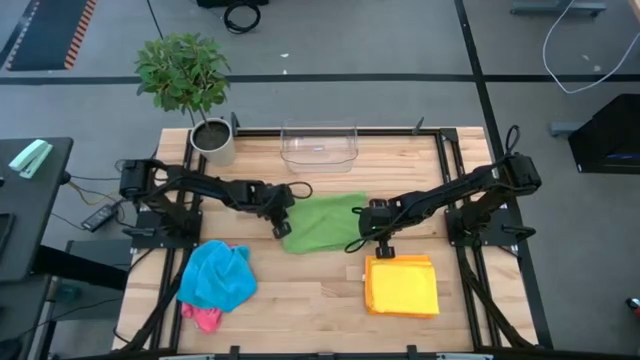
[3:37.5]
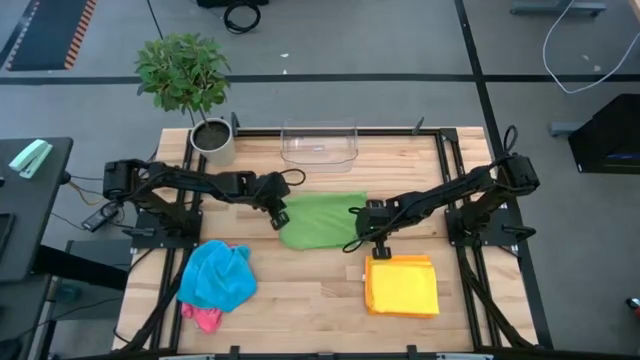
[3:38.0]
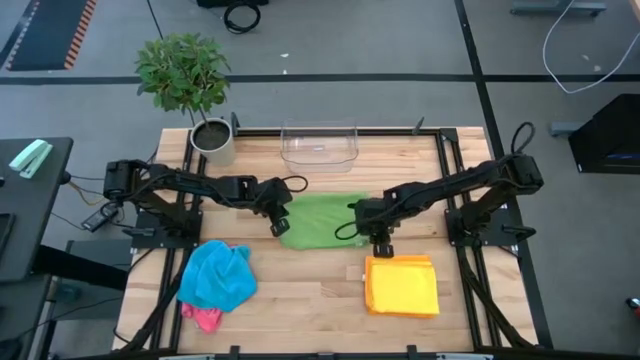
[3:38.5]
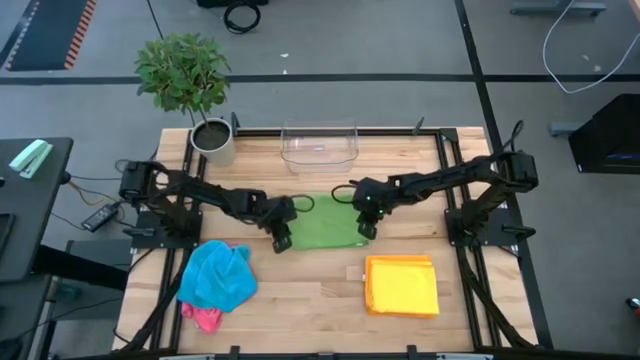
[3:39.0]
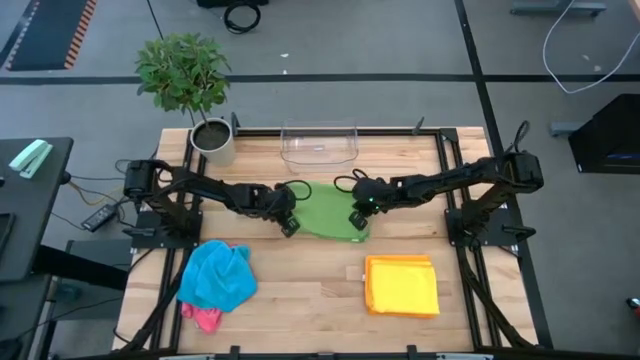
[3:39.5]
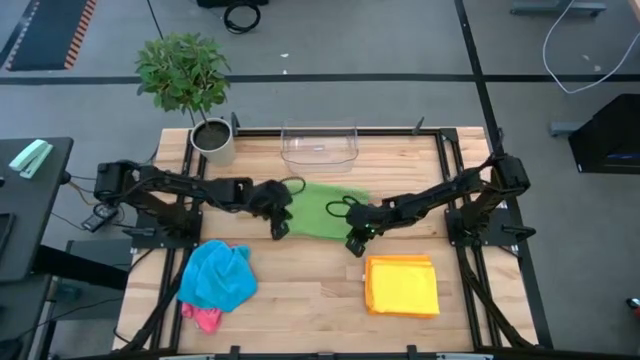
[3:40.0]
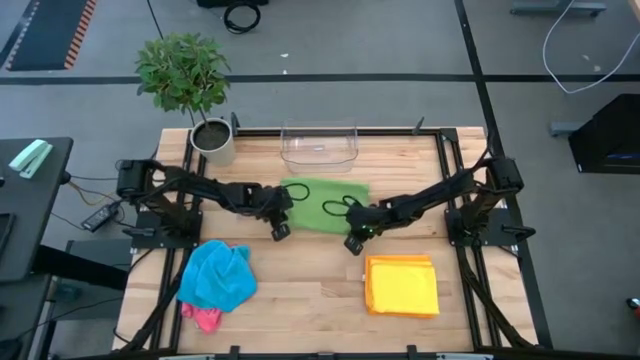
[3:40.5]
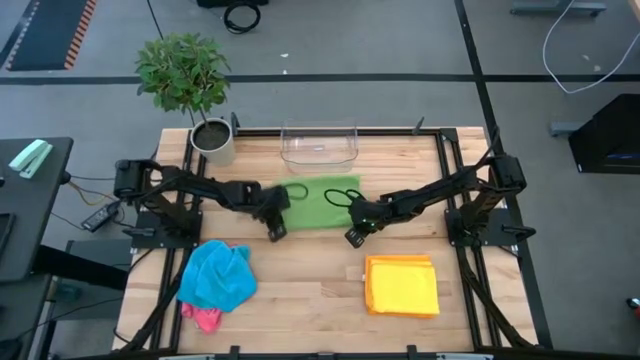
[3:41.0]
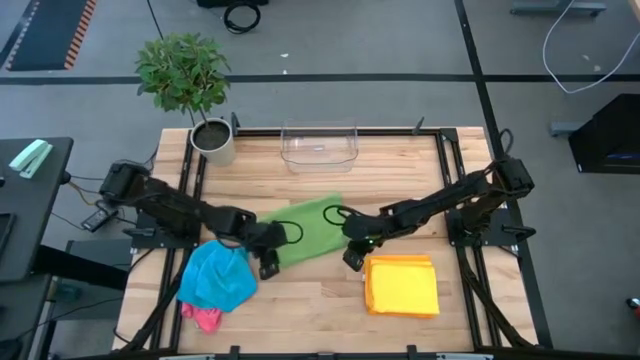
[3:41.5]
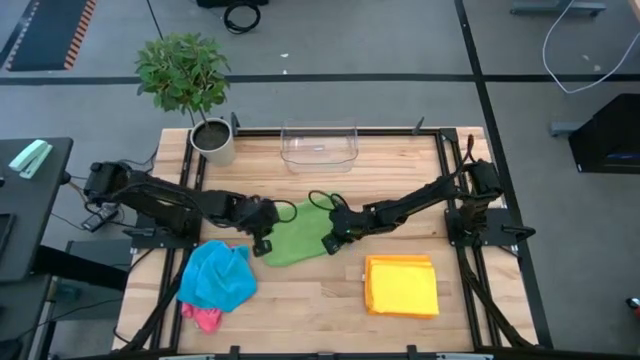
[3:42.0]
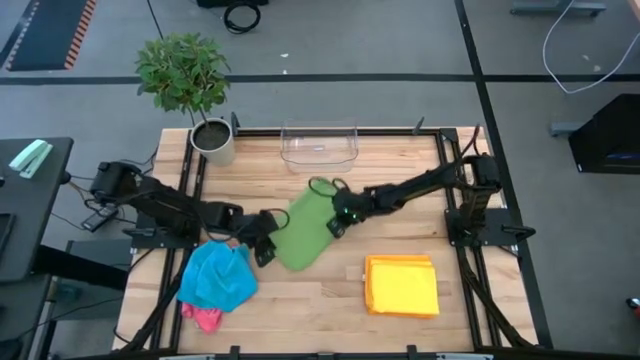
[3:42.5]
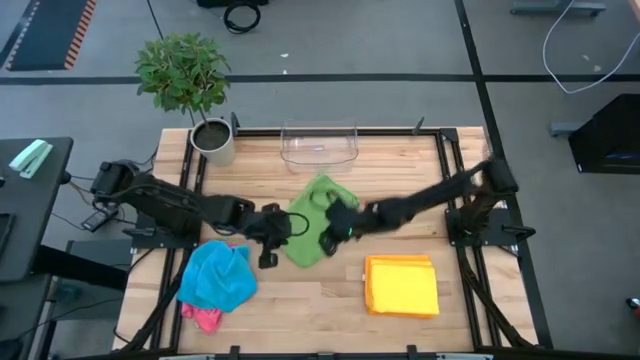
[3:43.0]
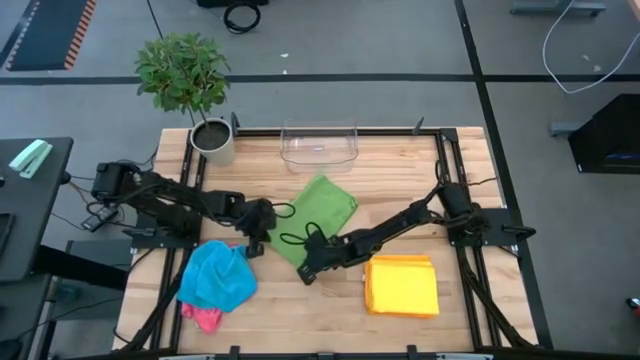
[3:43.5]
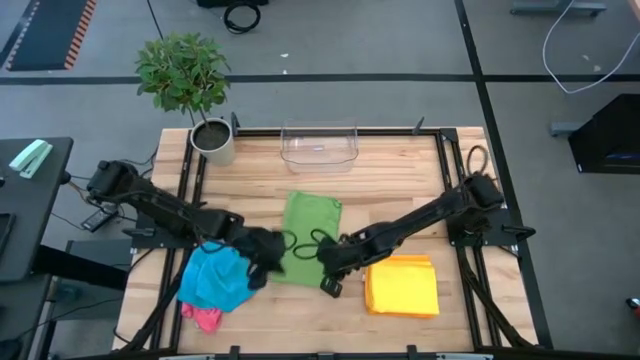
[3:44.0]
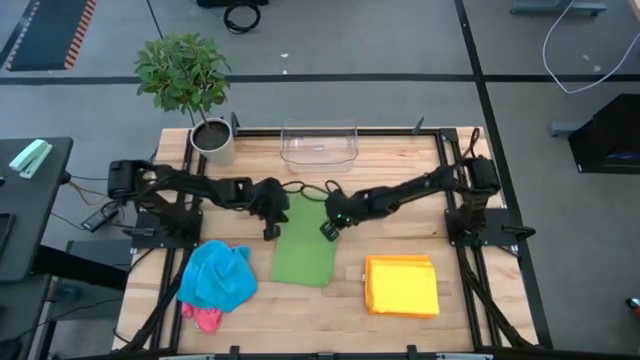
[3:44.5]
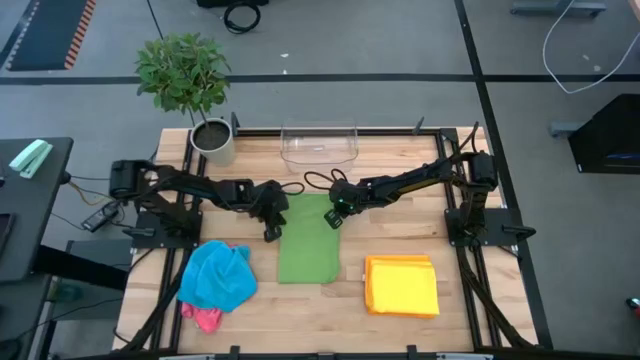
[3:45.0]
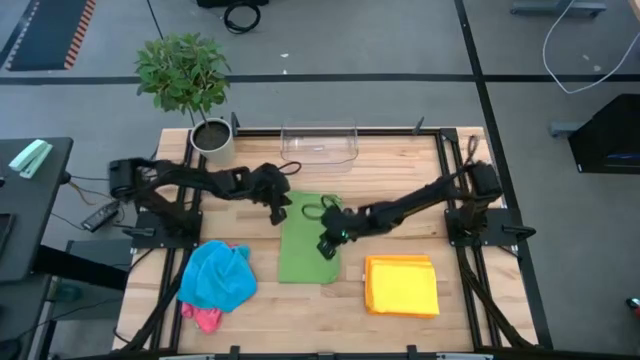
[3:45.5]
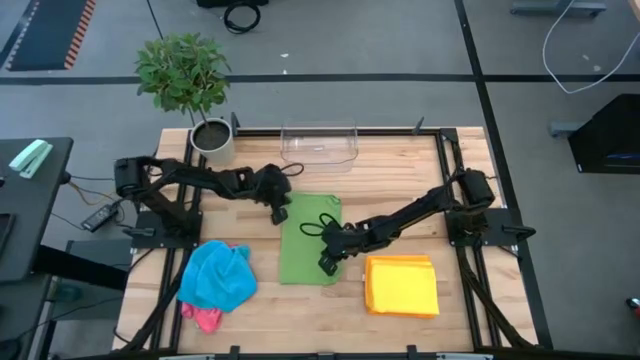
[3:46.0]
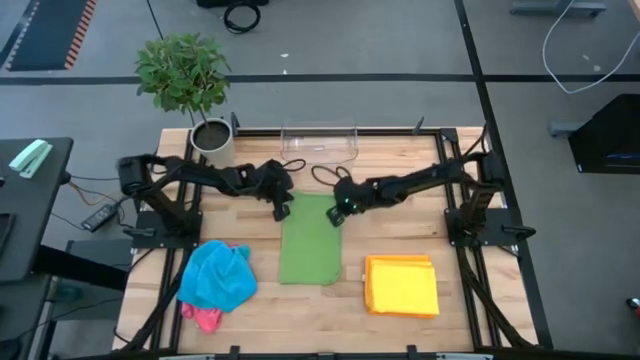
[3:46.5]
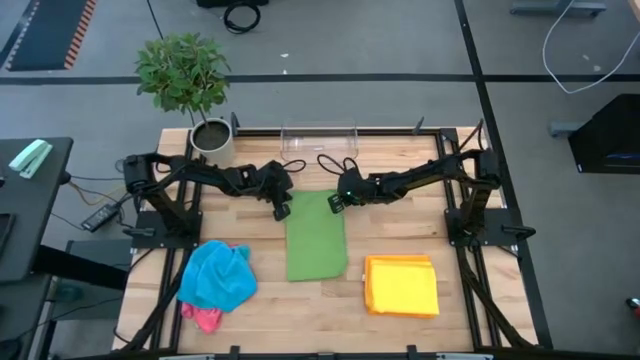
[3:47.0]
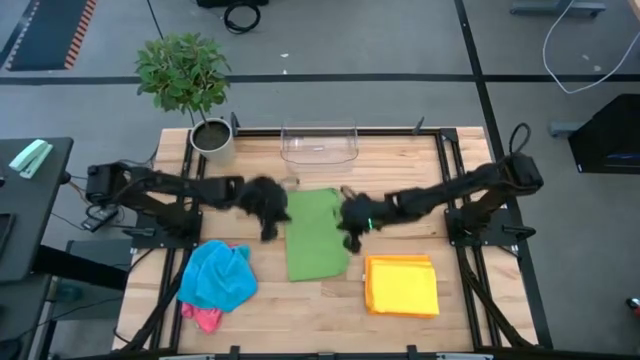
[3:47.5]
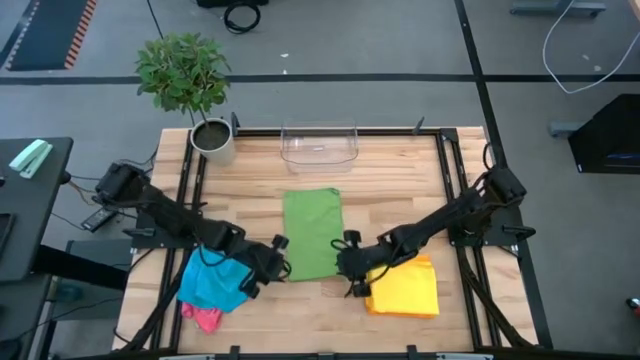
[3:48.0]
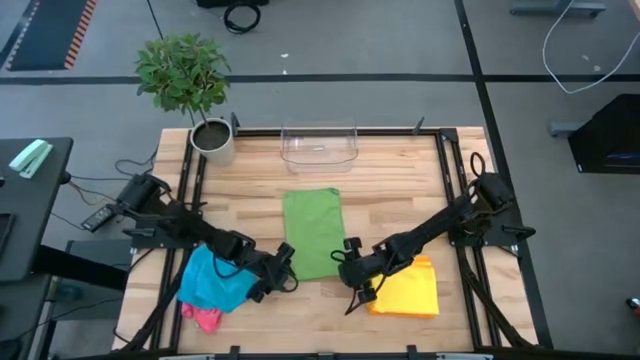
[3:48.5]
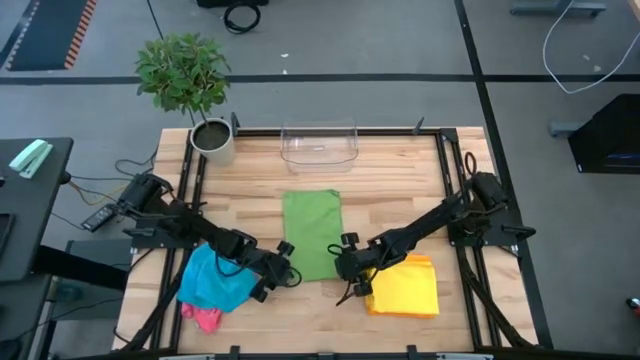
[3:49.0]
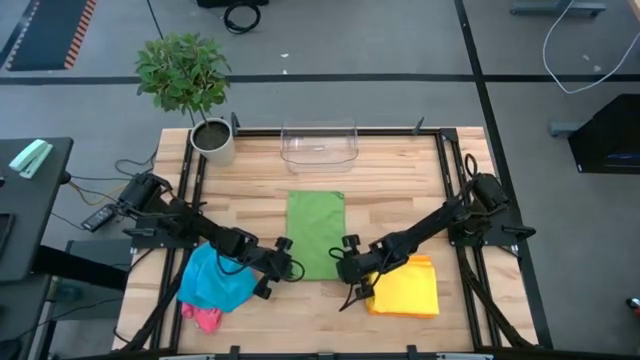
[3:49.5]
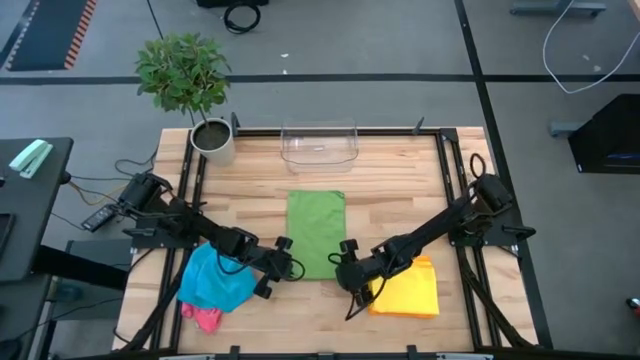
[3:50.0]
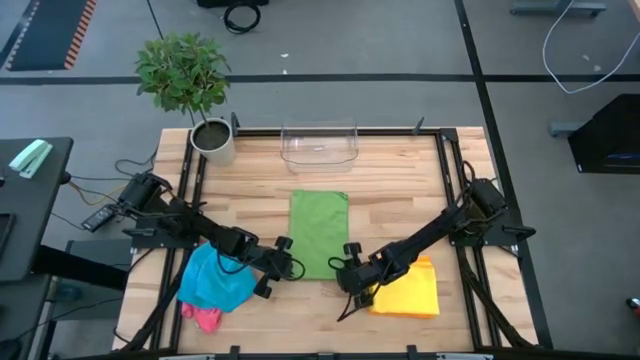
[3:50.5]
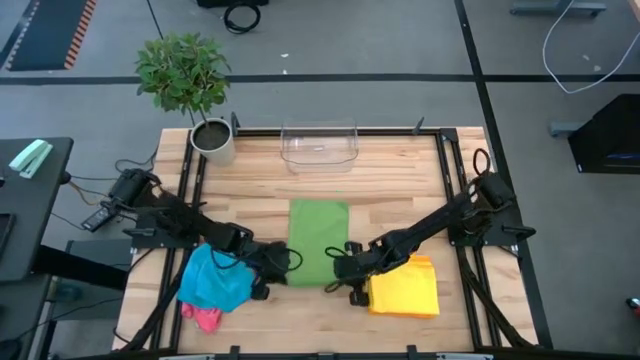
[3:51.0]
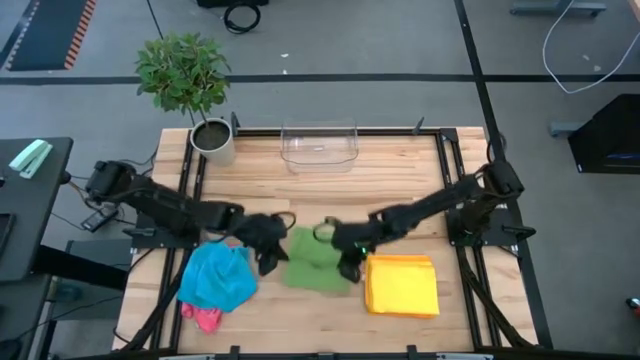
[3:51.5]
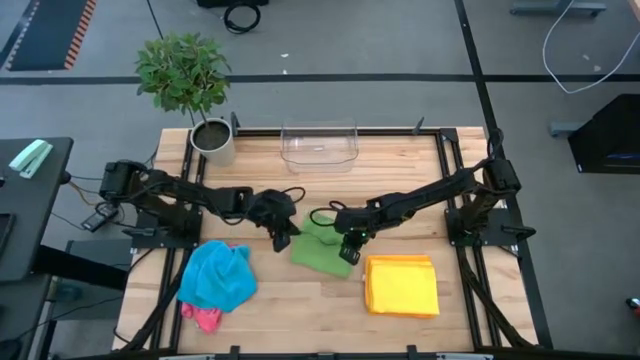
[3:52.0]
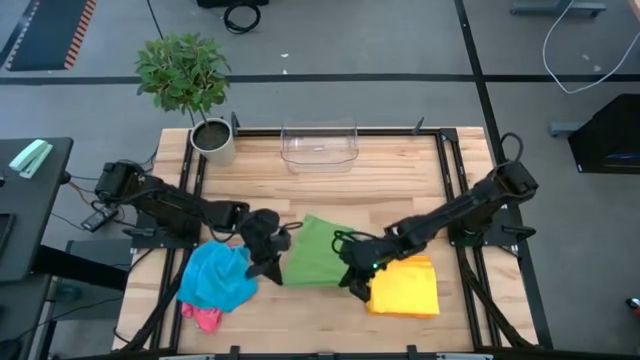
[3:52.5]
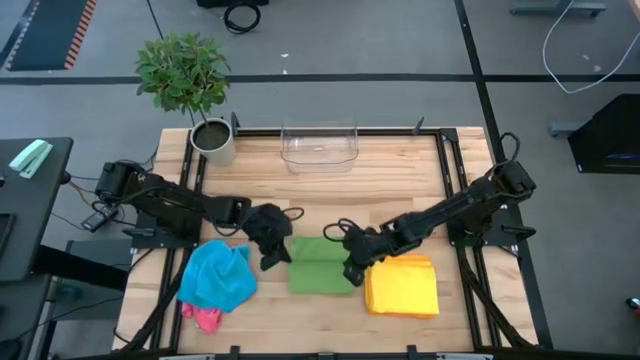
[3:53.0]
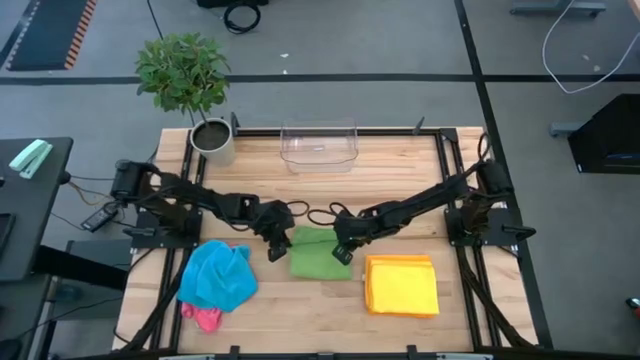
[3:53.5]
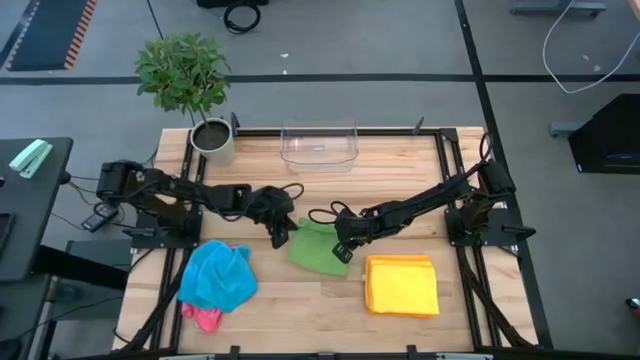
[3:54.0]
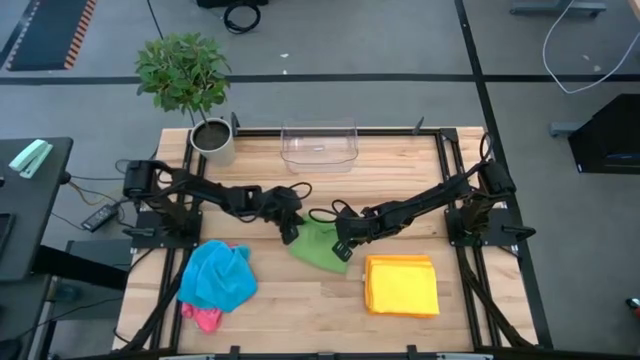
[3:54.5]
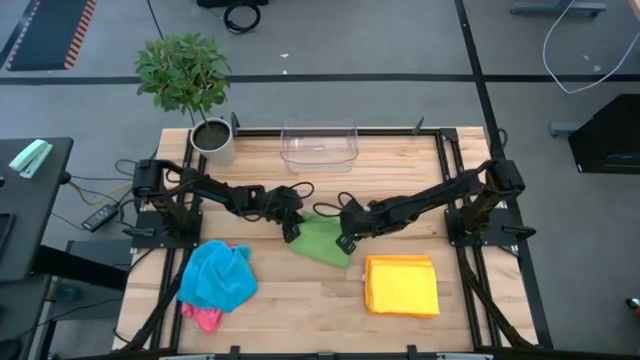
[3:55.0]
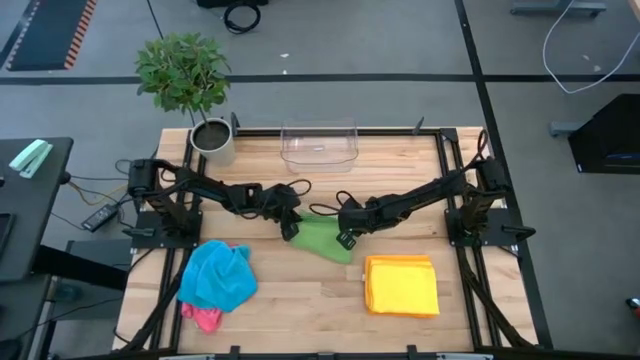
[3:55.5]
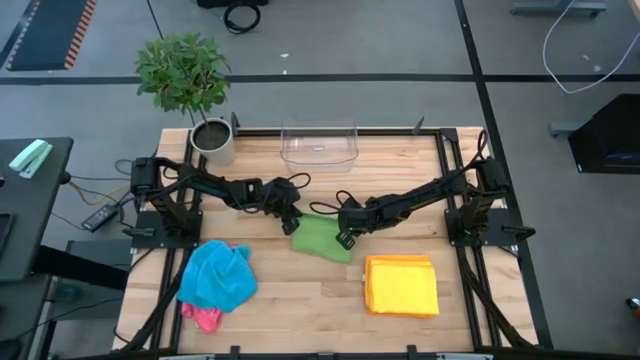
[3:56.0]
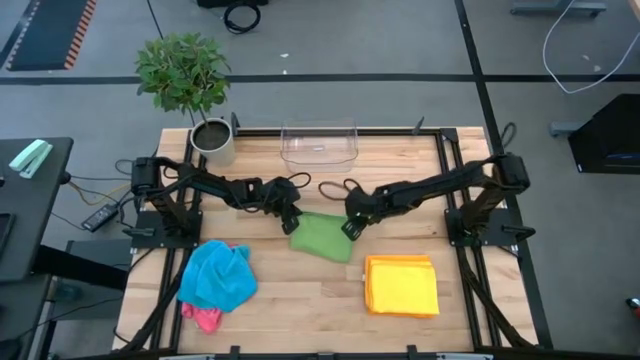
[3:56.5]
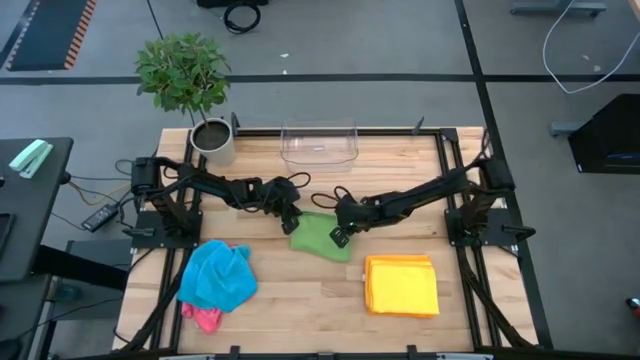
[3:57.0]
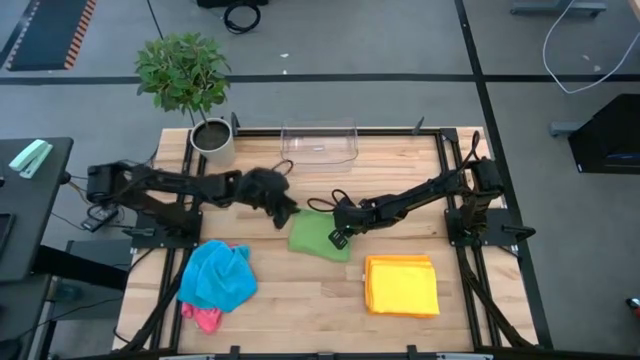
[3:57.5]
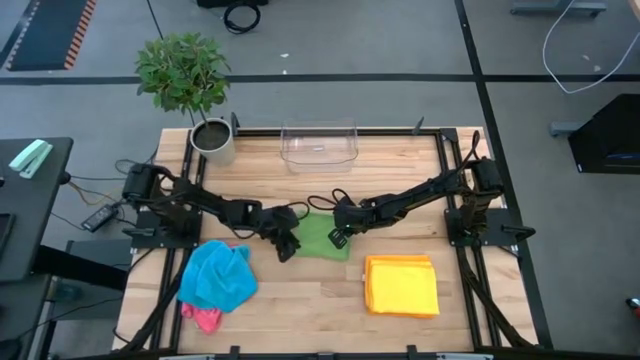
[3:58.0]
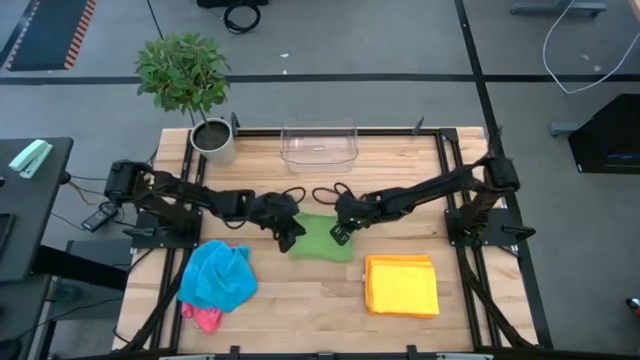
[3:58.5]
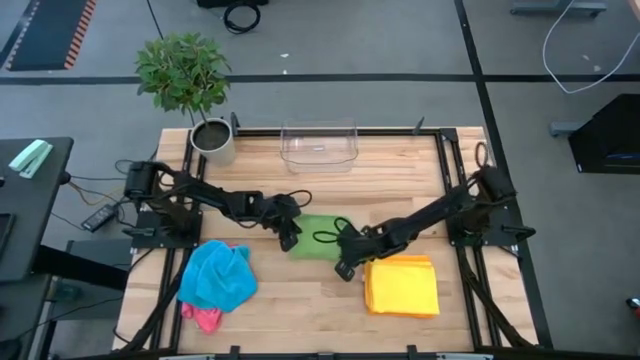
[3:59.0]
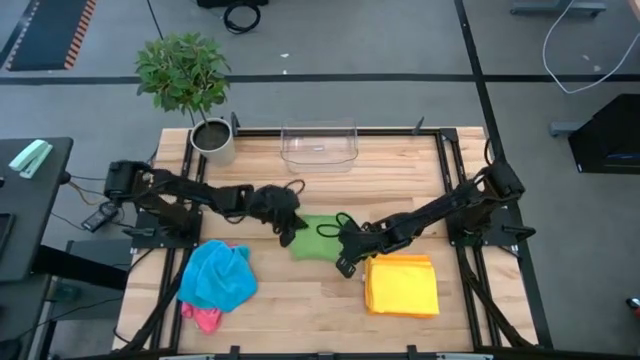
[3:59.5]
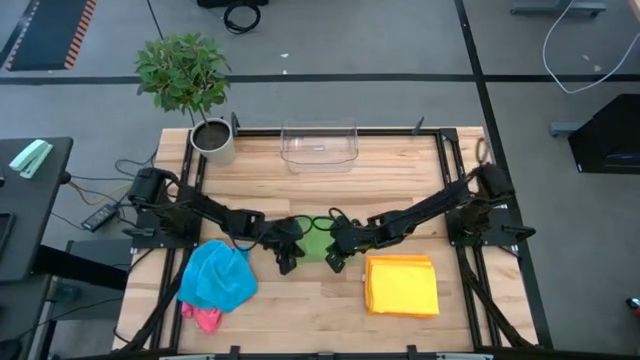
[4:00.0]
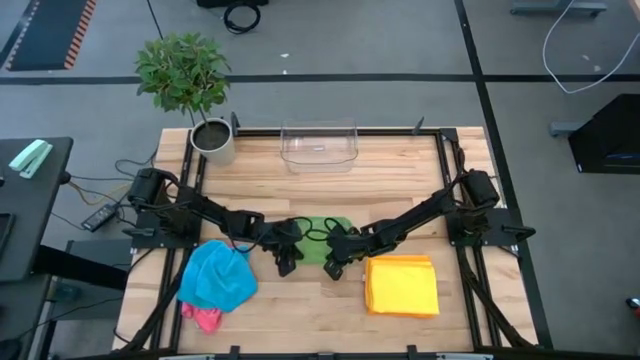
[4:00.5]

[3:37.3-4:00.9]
Task: Fold microfiber towels
Fold the green towel on the table
